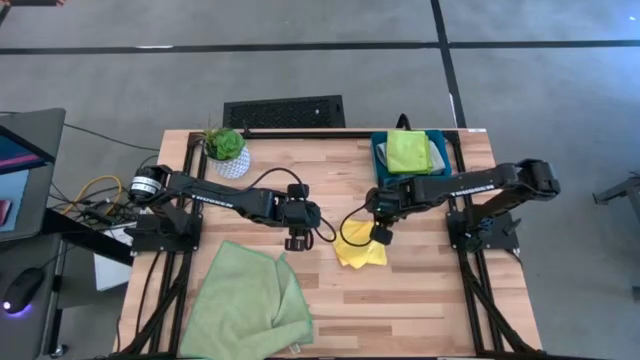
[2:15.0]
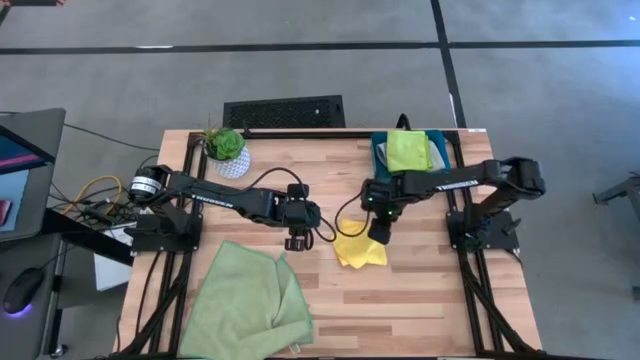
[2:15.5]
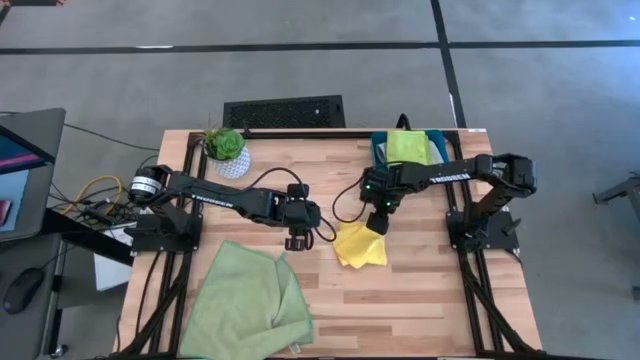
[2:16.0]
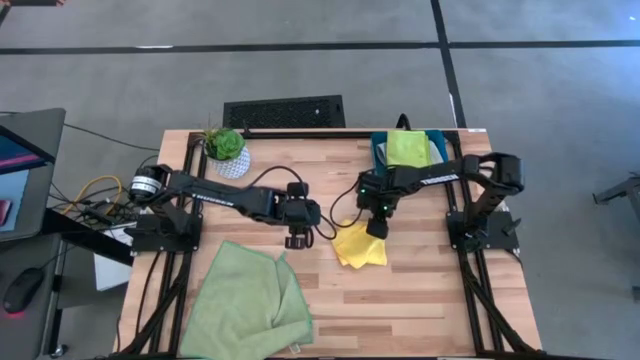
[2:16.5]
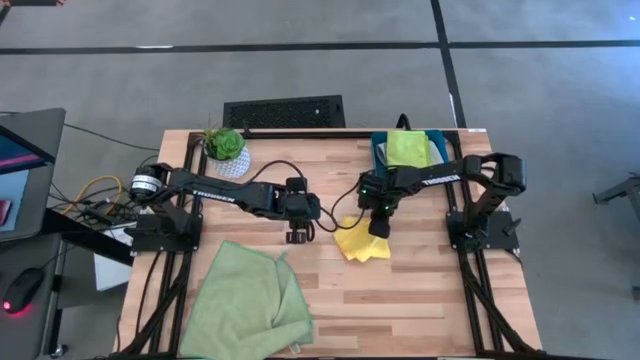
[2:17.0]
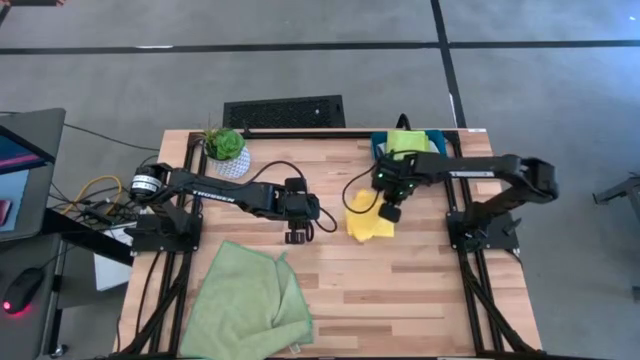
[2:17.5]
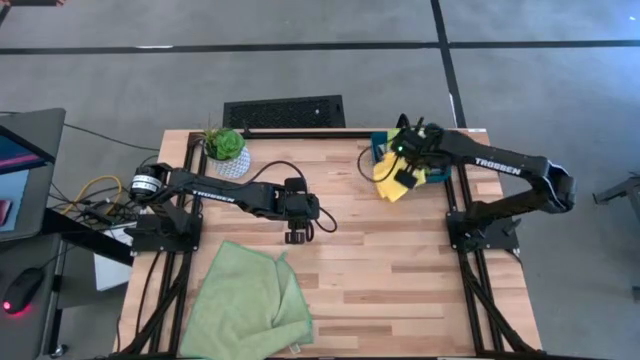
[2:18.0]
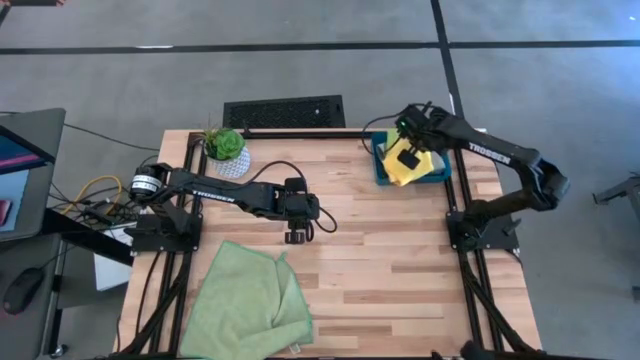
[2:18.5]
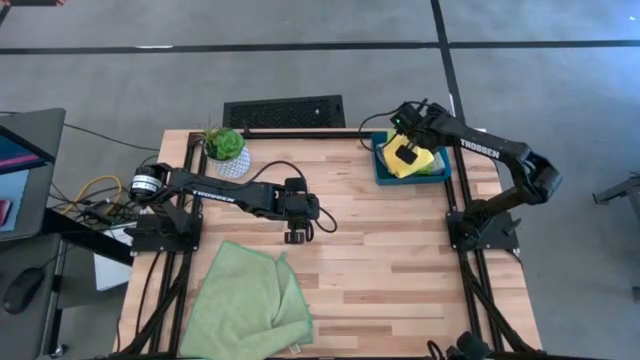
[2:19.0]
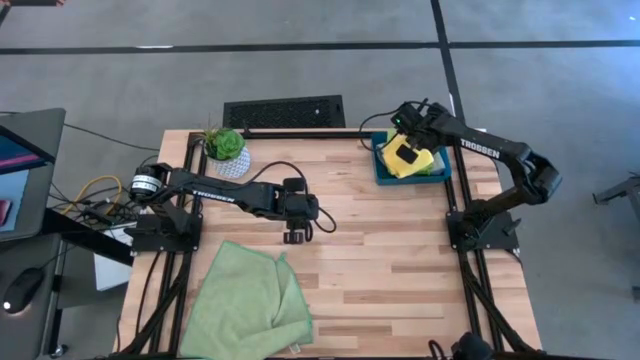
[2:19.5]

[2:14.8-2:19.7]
Task: Fold microfiber towels
Put the yellow microfiber towel into the blue bin

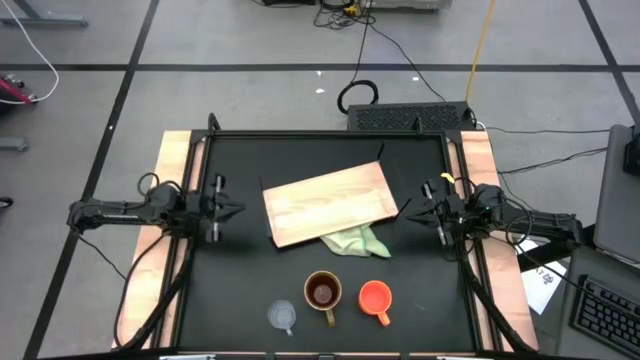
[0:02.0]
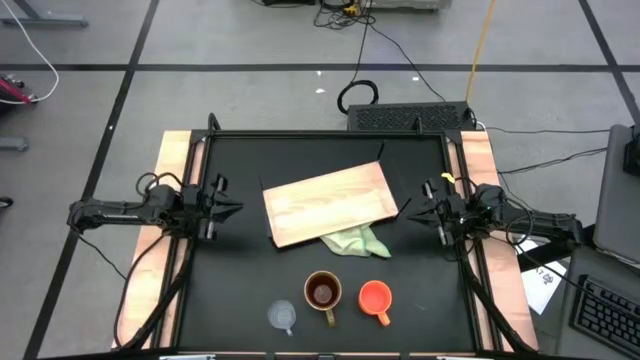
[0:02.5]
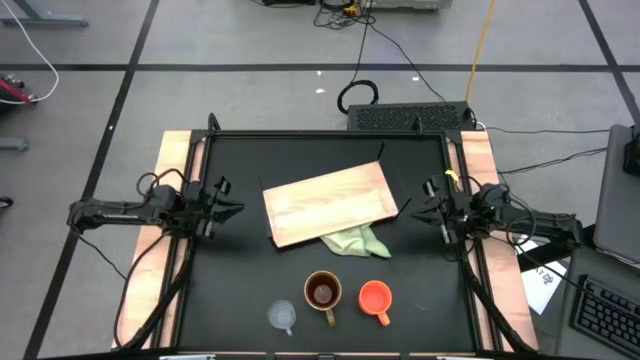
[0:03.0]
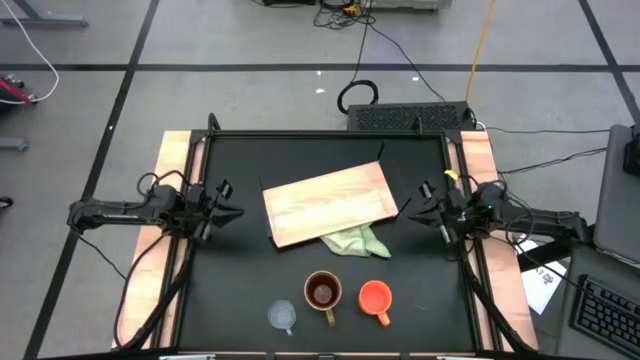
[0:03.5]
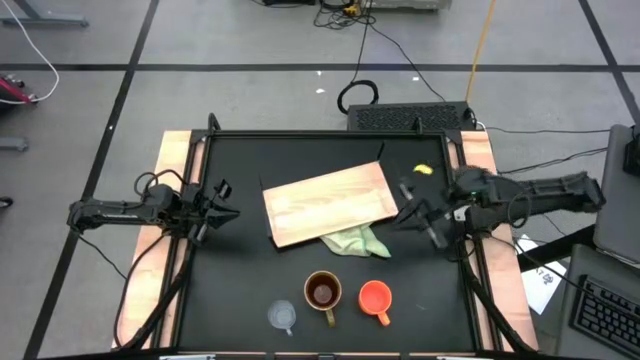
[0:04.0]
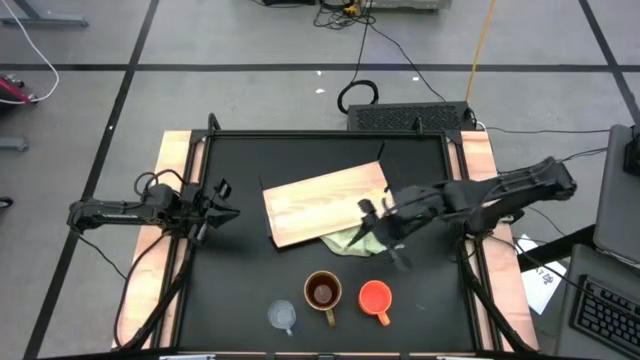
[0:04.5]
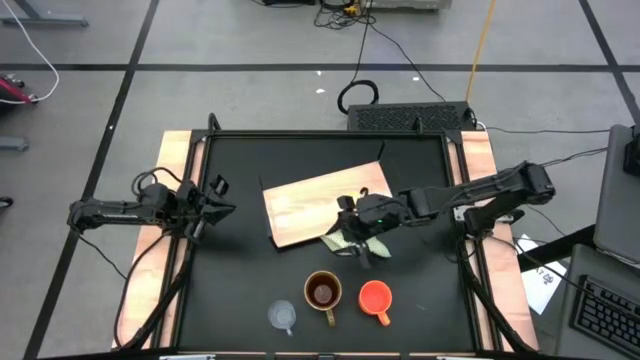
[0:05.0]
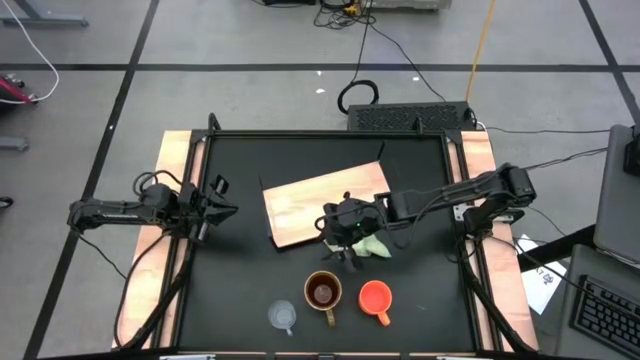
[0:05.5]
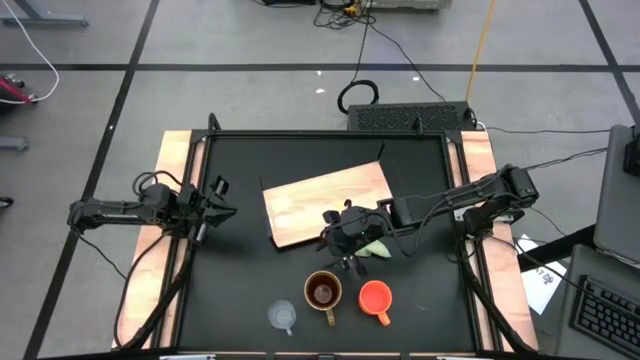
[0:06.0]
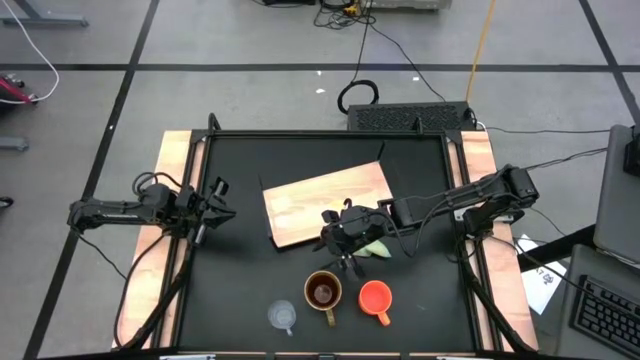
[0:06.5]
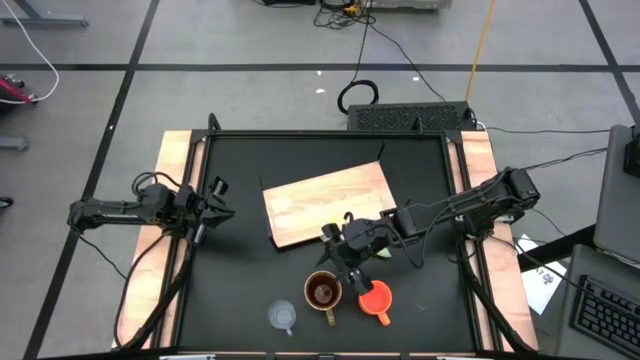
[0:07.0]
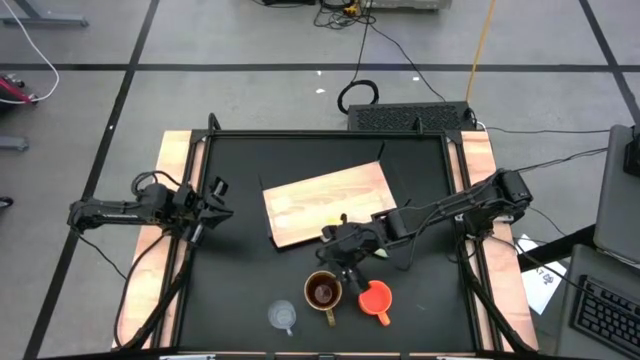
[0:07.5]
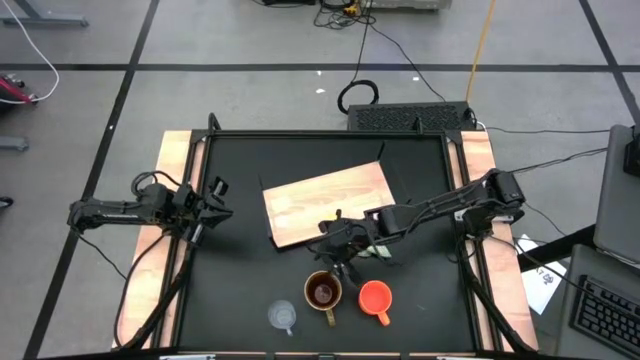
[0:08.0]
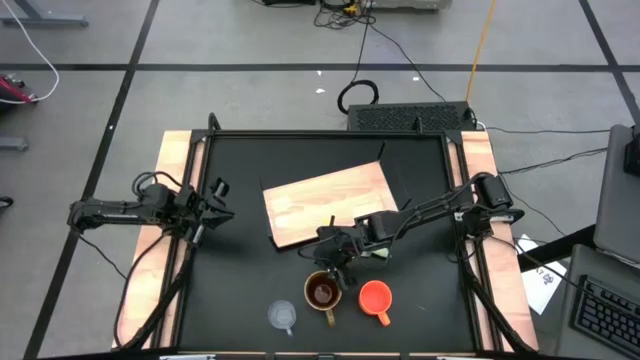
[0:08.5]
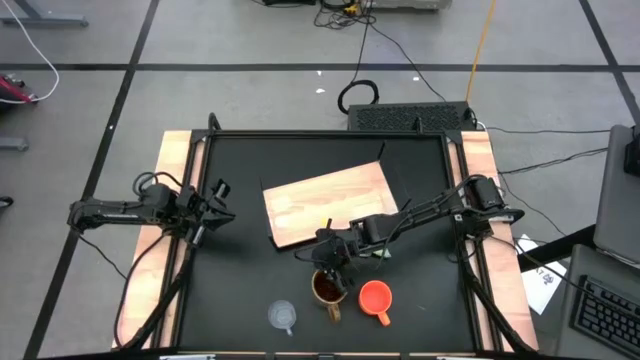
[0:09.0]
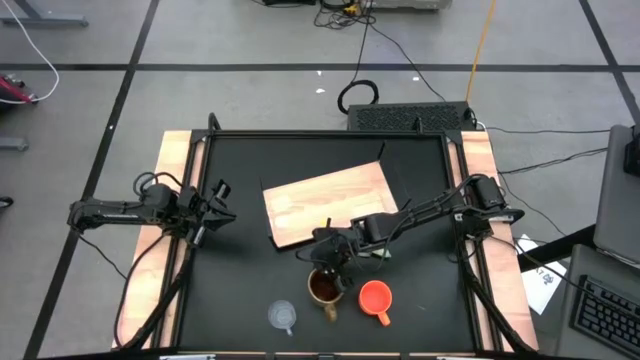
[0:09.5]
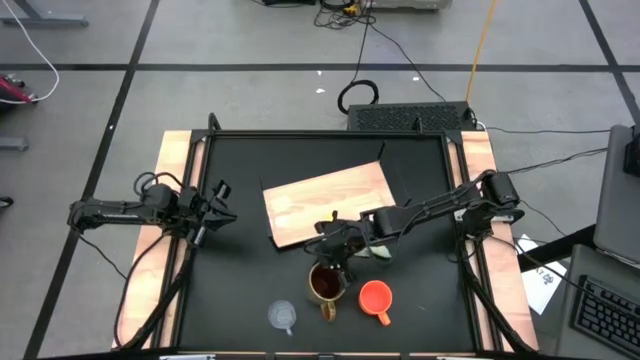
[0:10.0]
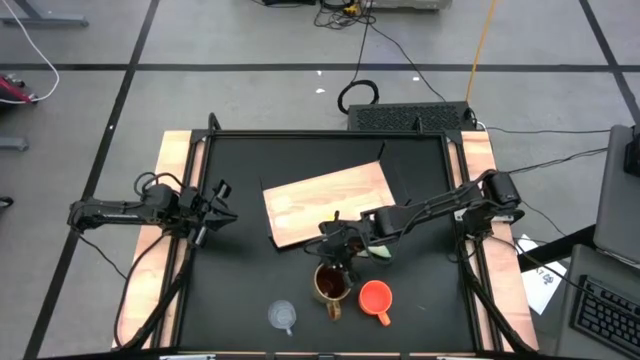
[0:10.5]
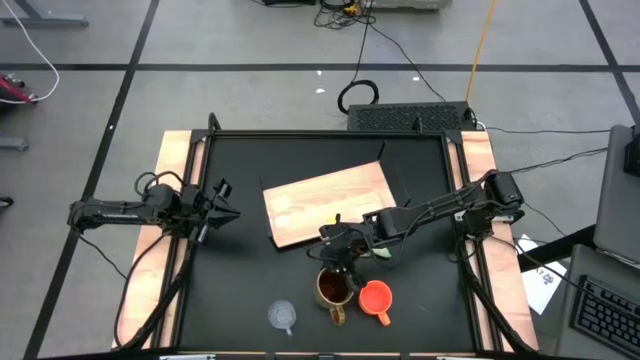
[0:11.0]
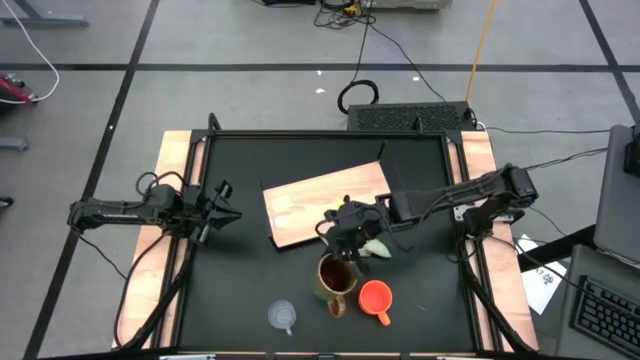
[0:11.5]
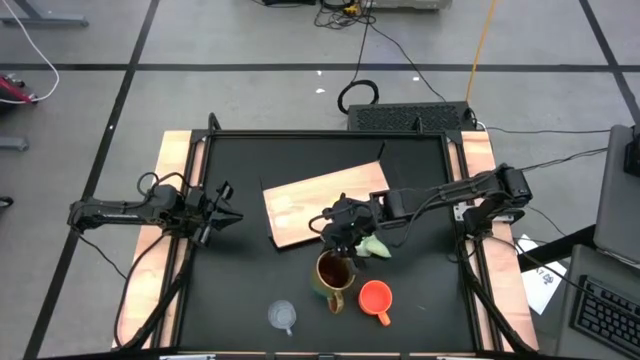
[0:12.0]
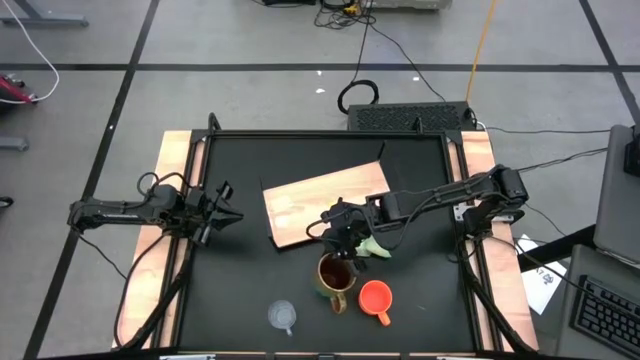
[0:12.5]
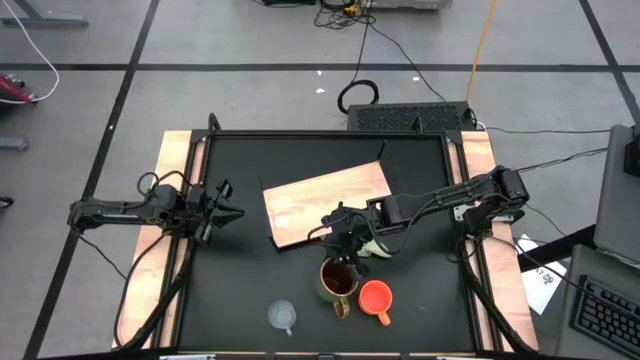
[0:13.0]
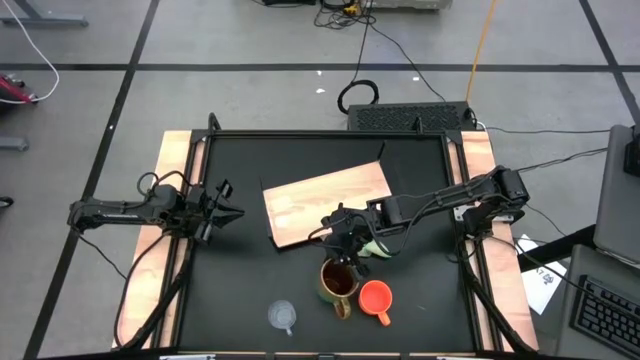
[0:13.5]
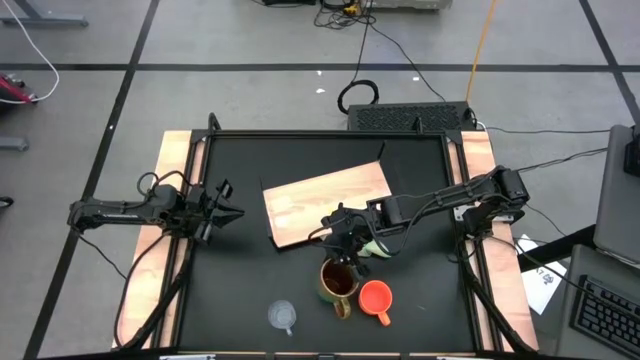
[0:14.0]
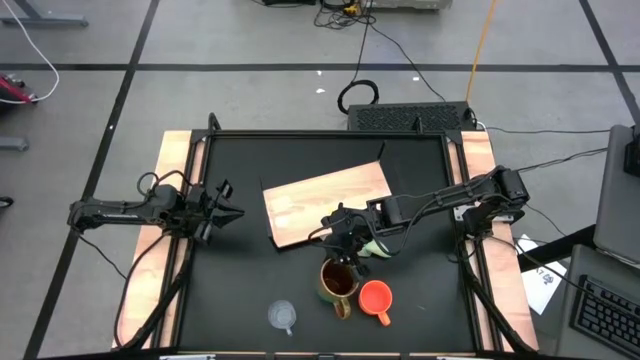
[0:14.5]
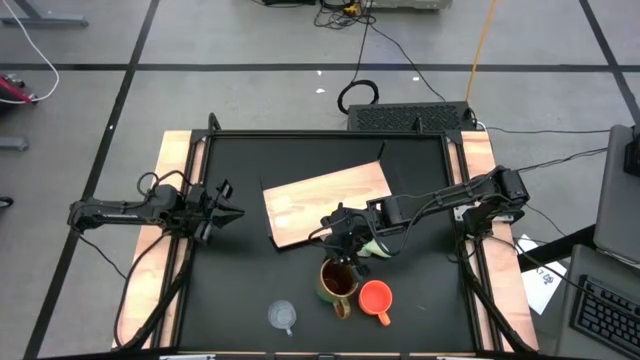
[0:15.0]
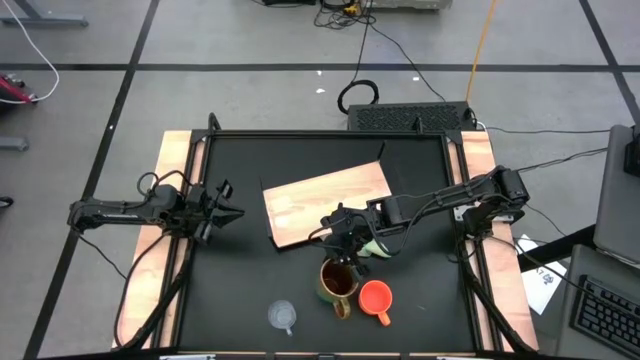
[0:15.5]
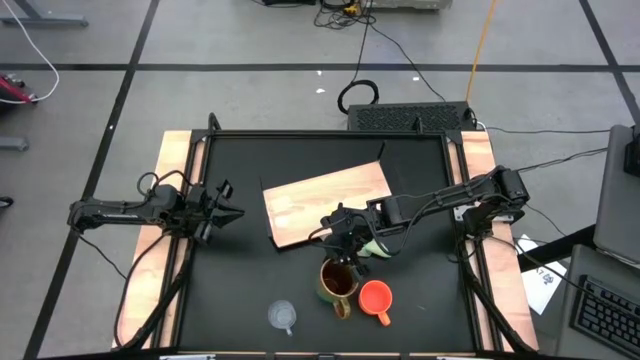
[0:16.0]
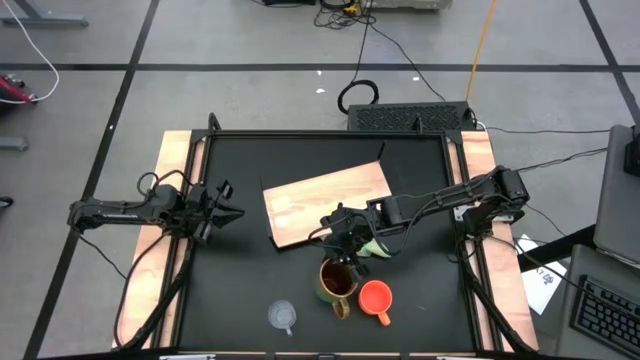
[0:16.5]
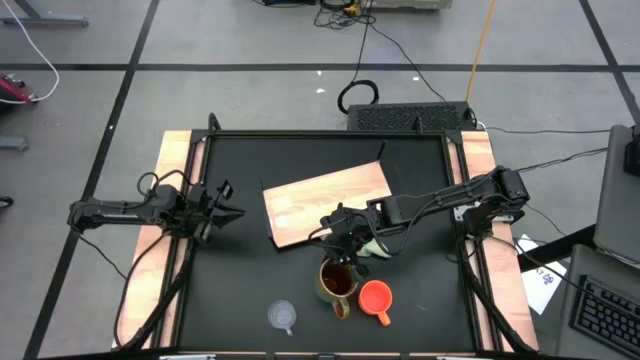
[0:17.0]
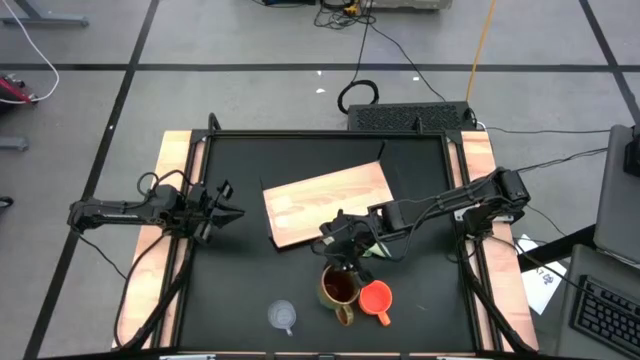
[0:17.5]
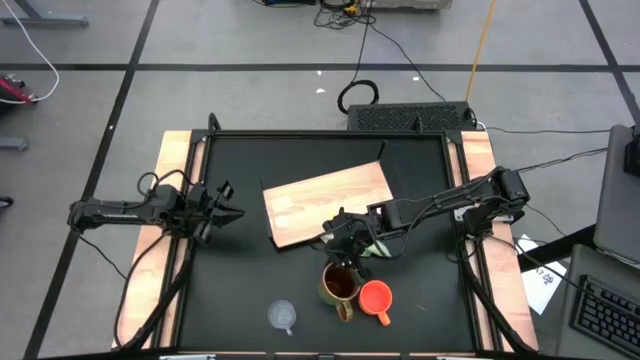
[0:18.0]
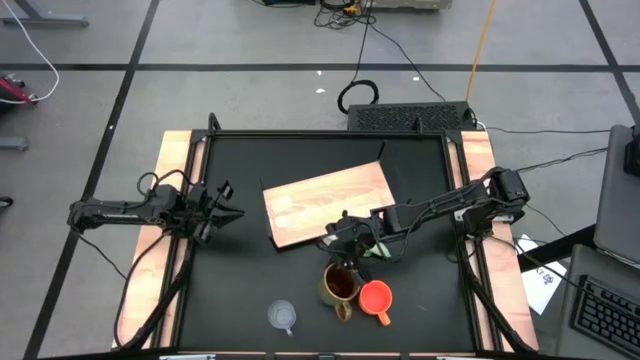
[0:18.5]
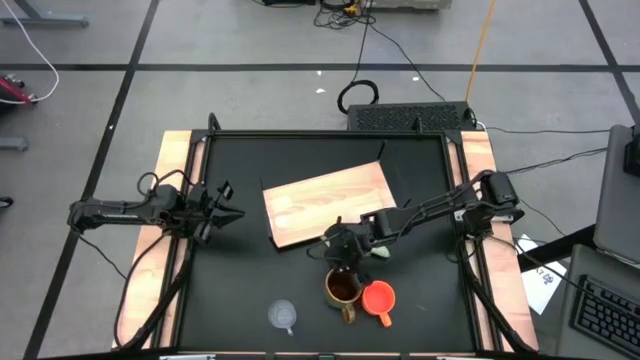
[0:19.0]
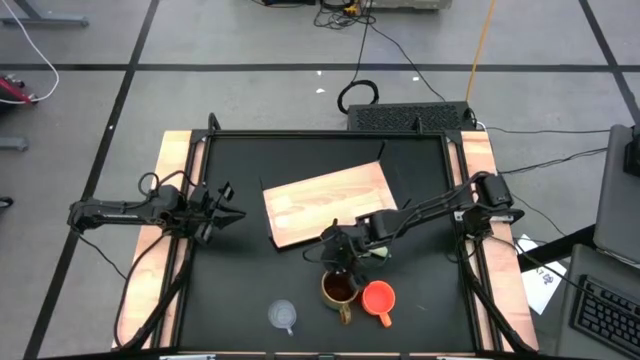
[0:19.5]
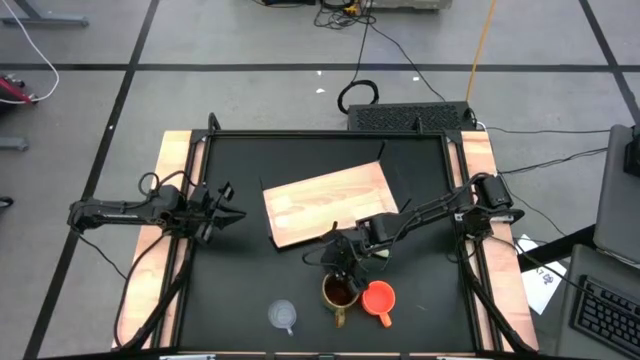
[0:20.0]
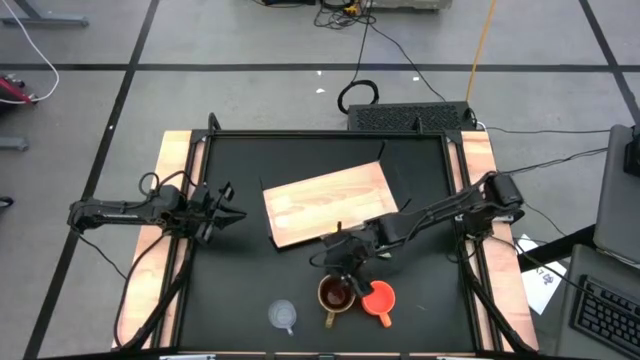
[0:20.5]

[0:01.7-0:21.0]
Task: Stack small to large cups/mugs on shelf
Put the green and blue mug on the shelf
